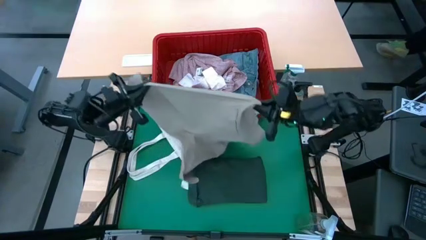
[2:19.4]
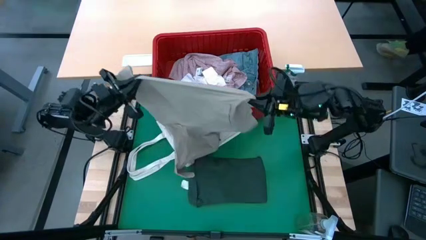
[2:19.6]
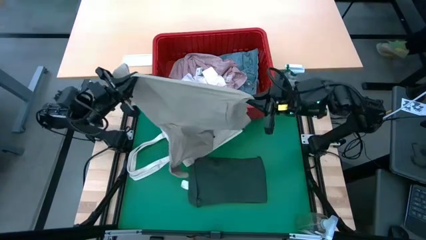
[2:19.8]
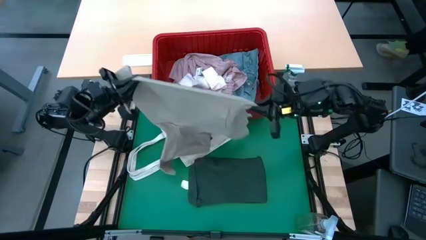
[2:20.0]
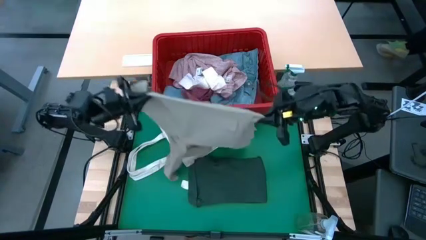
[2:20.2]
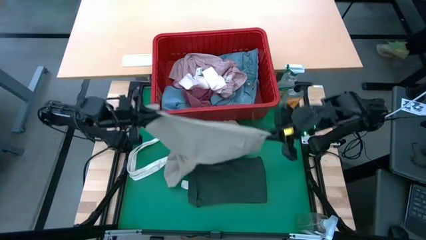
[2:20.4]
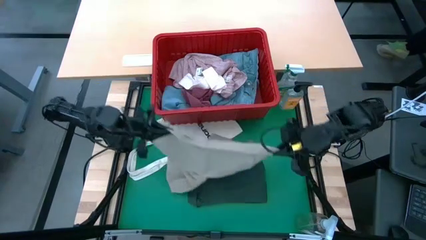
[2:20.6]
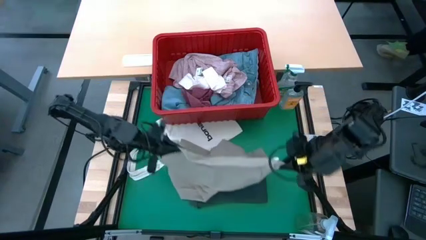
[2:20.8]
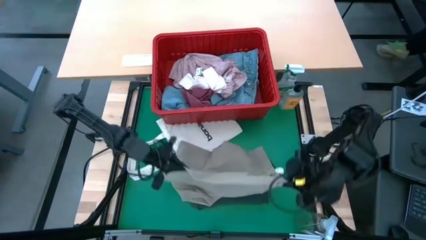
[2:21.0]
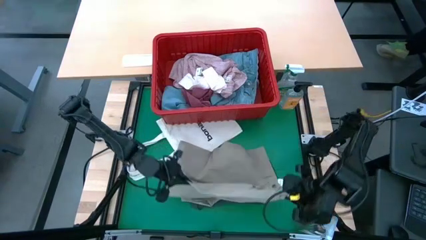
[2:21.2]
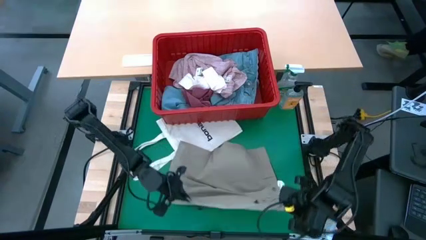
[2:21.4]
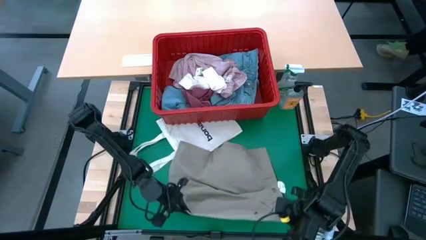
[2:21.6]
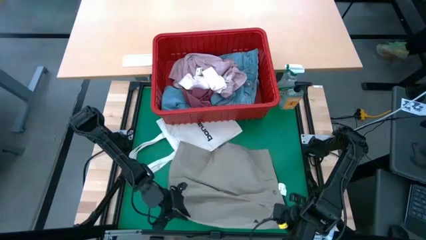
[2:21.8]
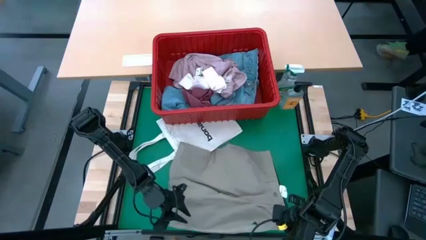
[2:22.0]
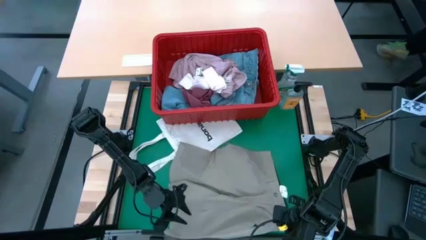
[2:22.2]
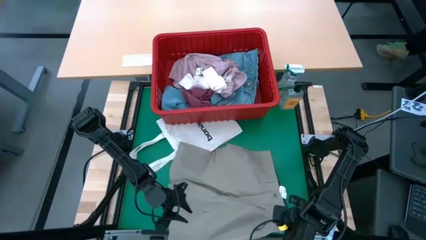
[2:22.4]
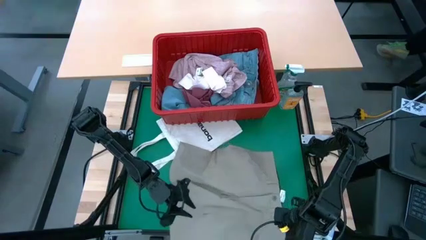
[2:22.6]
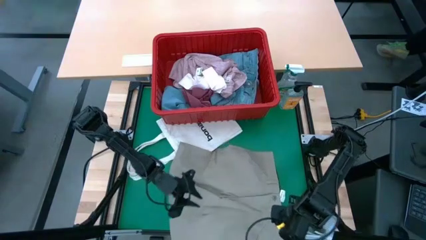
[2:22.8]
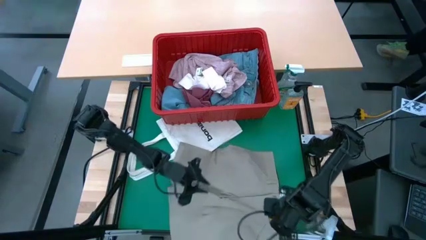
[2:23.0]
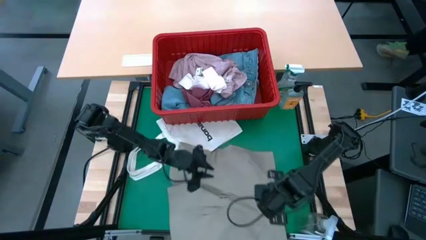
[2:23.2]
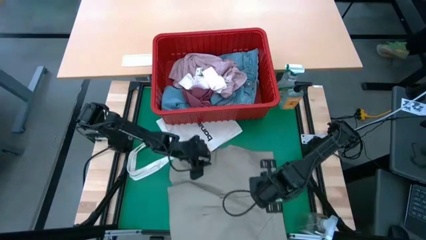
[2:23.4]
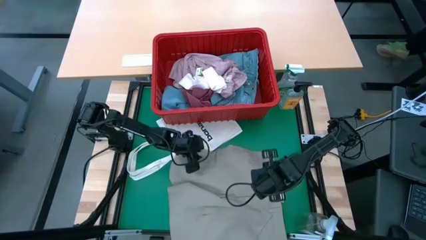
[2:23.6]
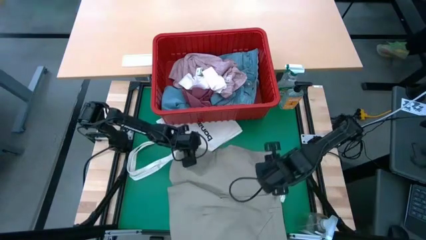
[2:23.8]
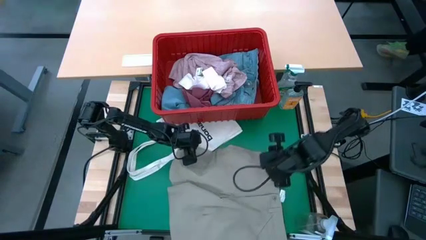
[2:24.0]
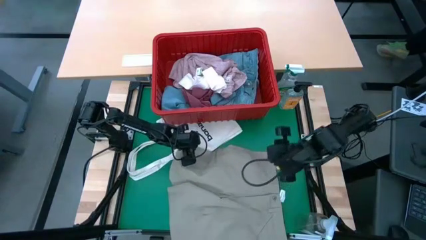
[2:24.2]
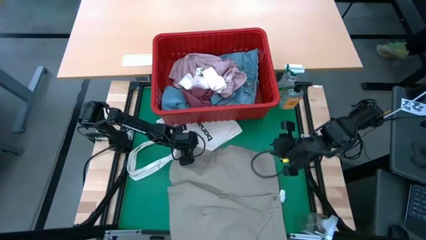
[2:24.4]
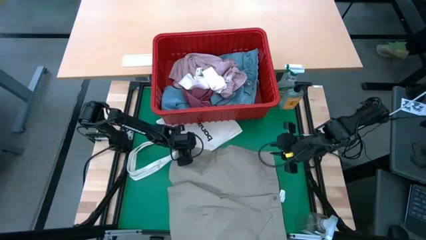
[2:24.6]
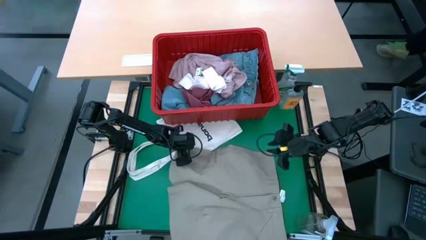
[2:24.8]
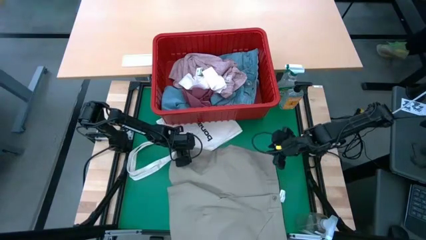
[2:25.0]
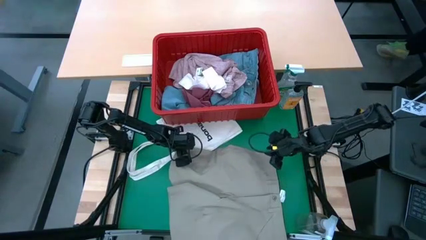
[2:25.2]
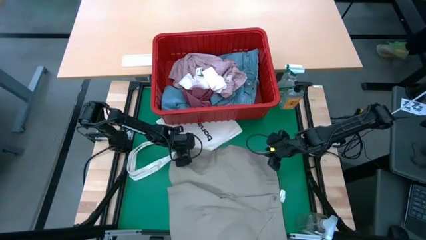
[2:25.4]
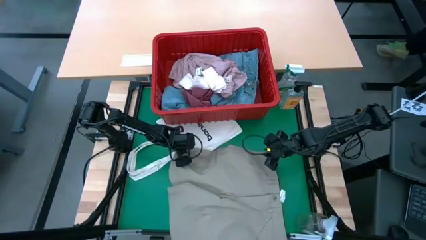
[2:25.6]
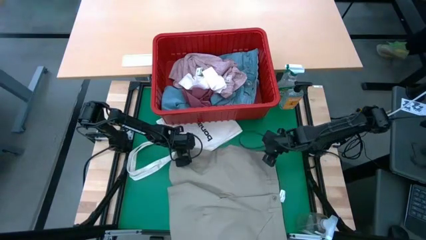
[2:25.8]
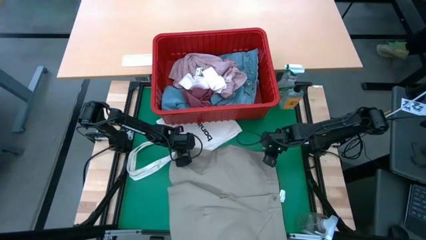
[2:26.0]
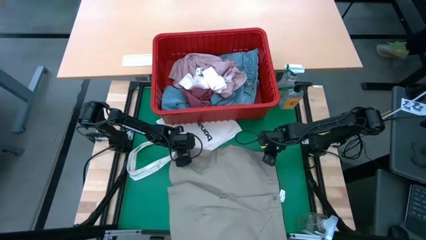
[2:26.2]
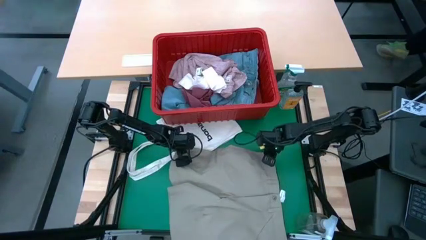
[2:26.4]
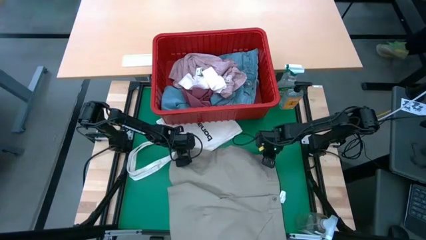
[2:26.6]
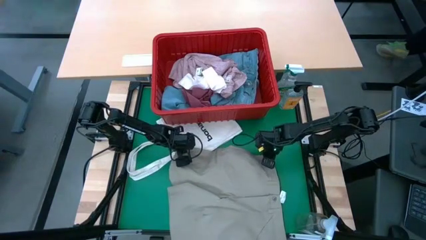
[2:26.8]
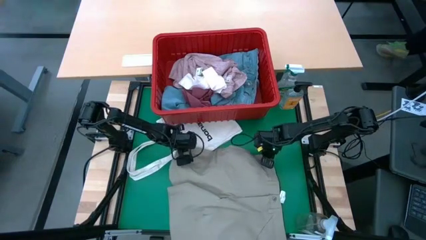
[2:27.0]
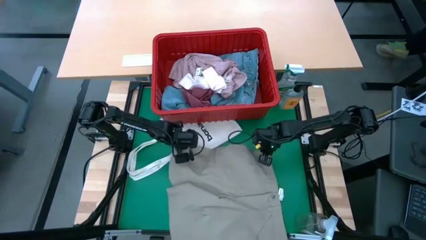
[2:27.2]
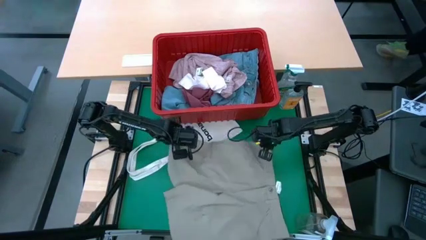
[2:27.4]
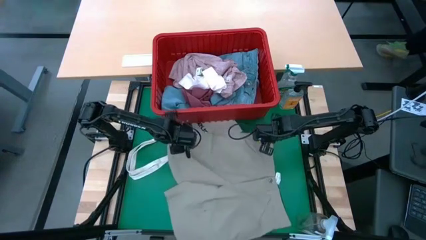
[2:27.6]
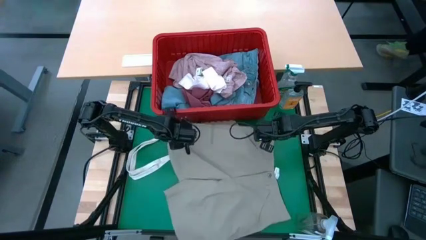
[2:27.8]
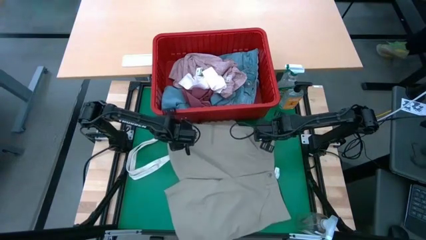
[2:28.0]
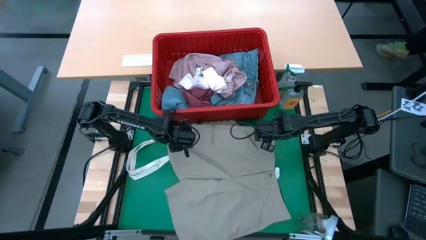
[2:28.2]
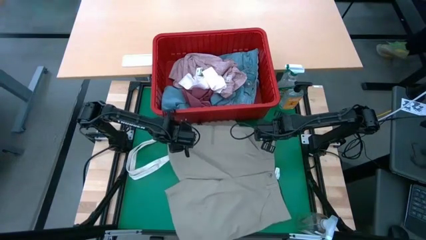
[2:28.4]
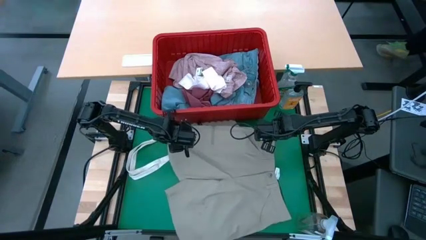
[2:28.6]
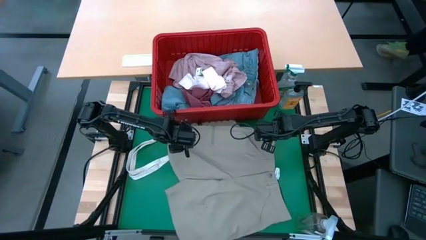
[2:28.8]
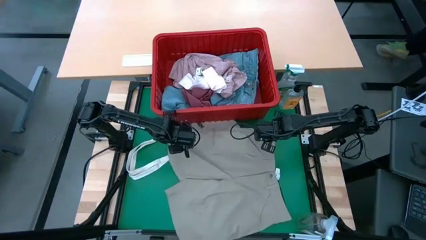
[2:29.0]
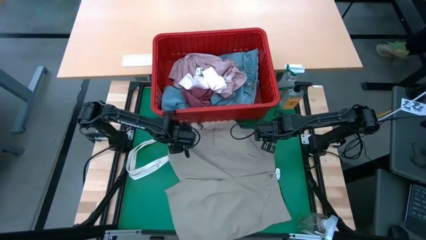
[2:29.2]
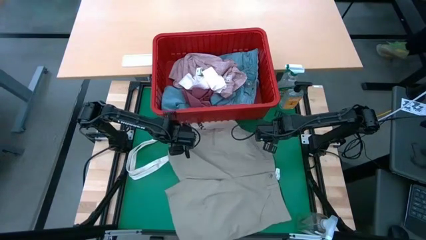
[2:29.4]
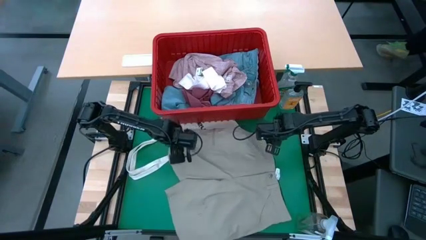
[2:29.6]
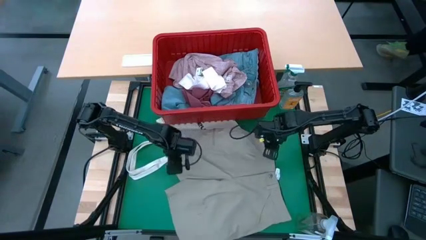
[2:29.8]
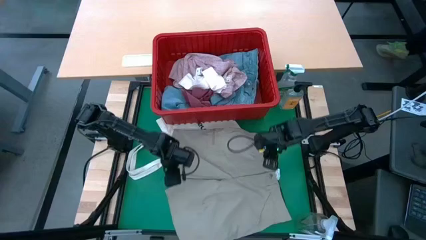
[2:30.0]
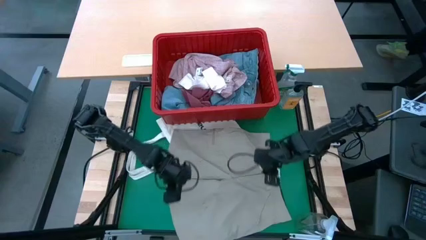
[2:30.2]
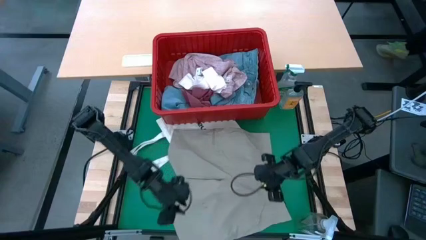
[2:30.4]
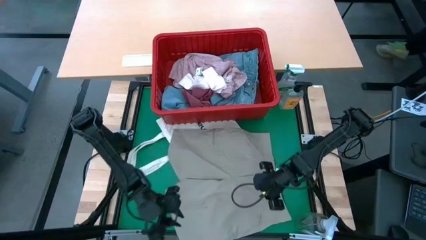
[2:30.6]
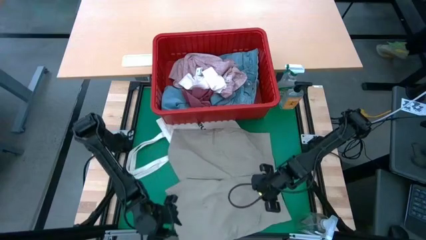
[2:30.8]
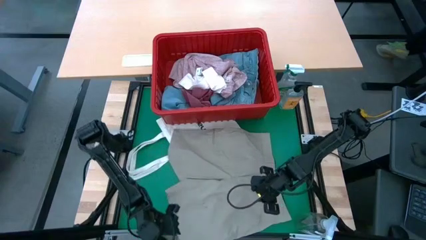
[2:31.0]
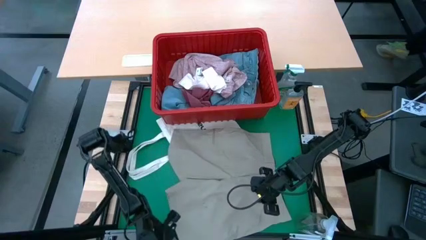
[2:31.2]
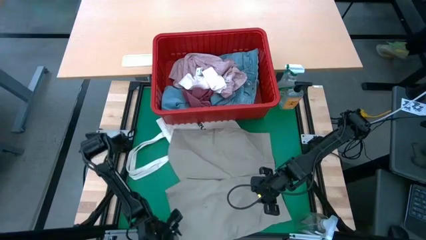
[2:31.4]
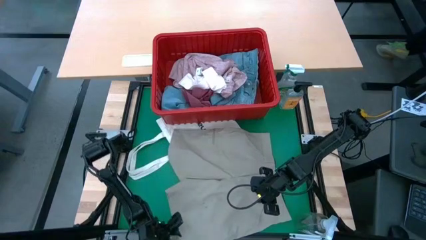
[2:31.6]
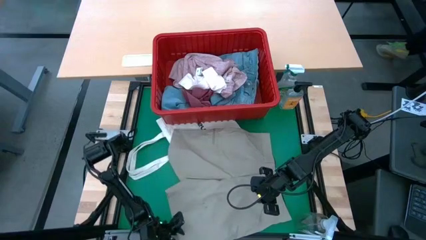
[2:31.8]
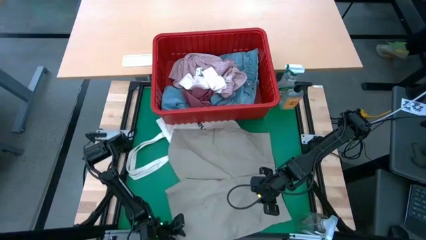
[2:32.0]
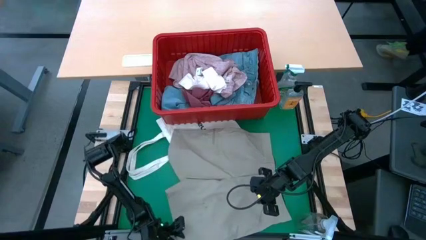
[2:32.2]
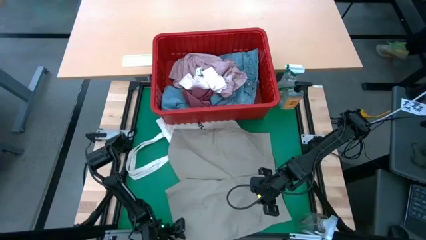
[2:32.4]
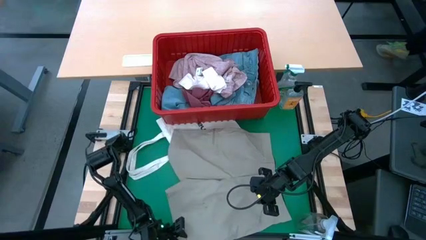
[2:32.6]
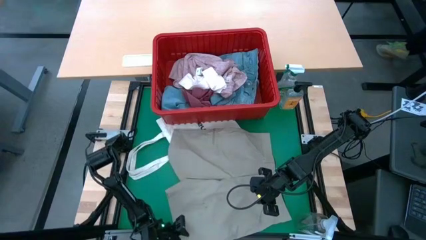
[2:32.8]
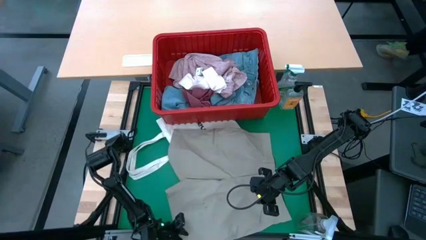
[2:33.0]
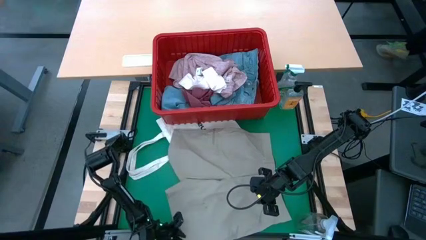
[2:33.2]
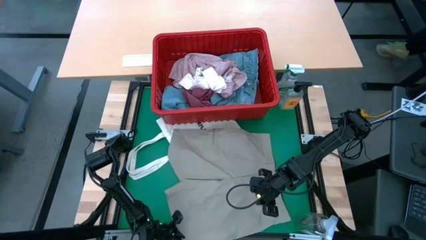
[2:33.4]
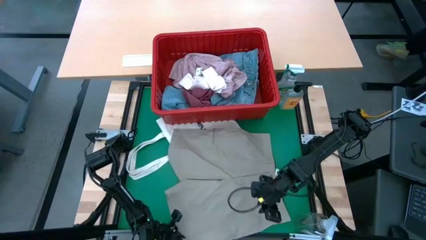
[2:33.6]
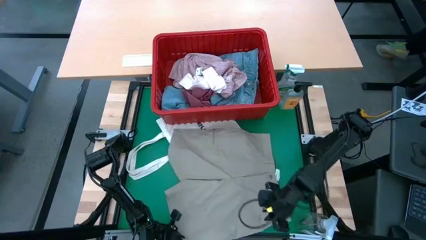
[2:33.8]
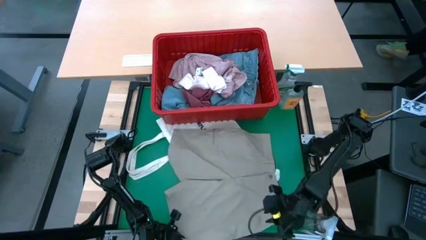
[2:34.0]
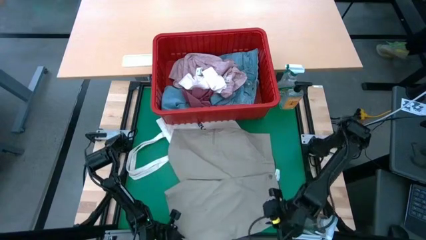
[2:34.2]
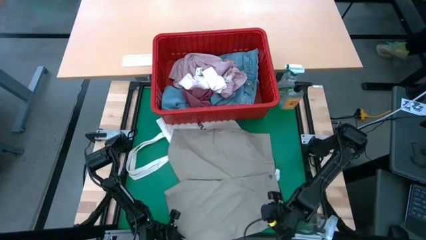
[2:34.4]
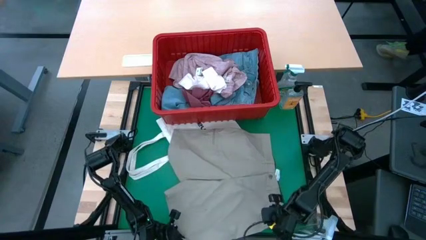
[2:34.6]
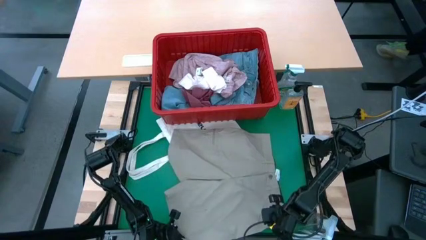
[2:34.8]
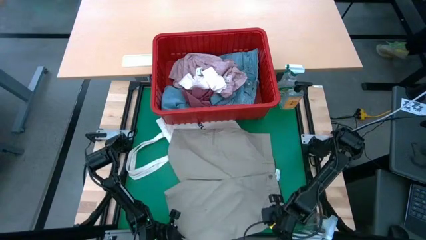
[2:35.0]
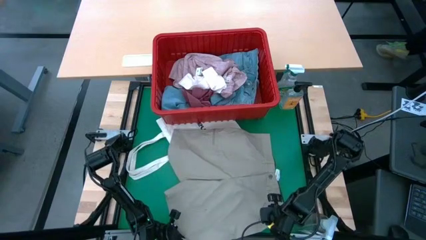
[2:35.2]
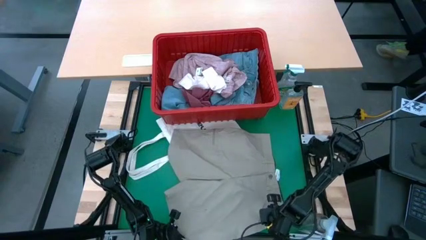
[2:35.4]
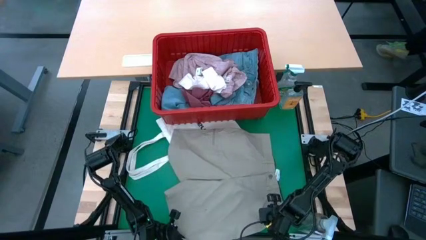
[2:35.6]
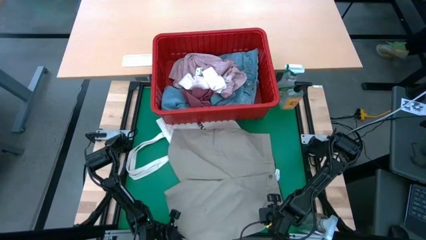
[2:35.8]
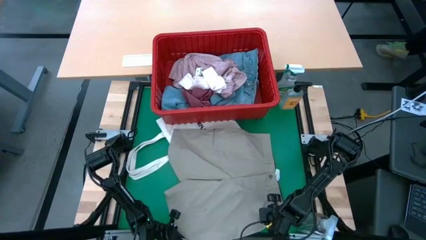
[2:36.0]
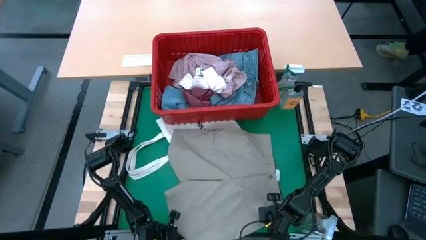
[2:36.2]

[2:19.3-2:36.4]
Task: Fold laundry
Fold the grey shorts
